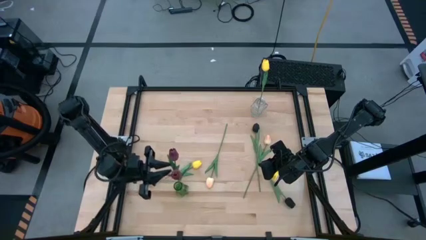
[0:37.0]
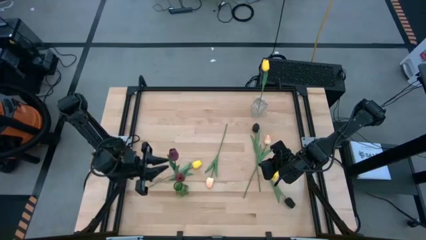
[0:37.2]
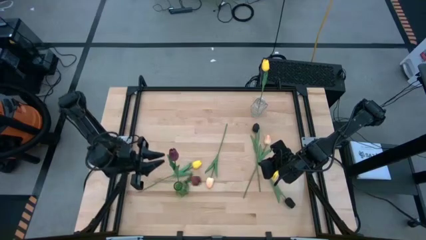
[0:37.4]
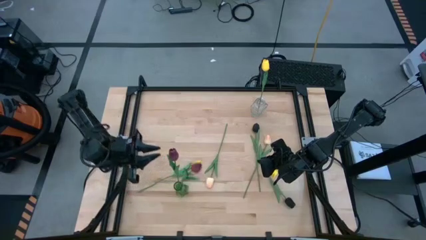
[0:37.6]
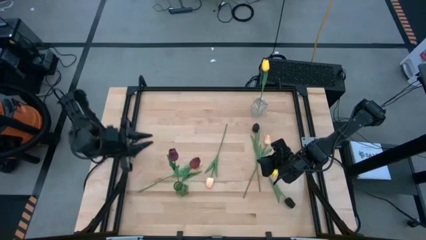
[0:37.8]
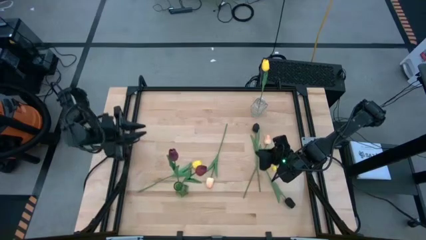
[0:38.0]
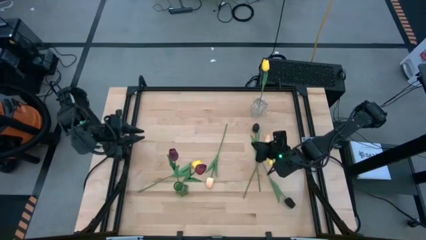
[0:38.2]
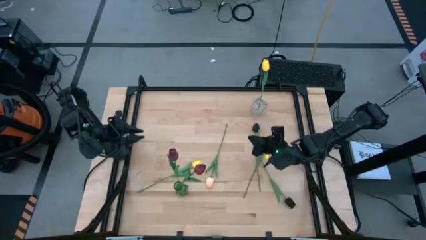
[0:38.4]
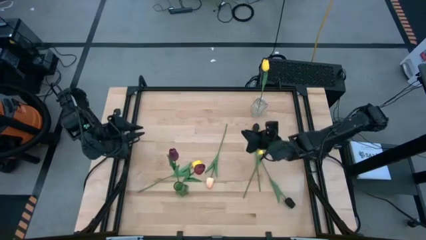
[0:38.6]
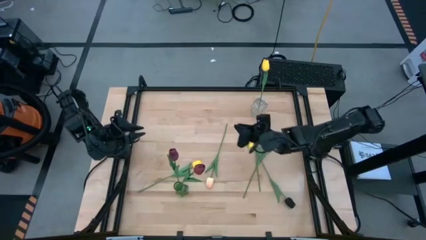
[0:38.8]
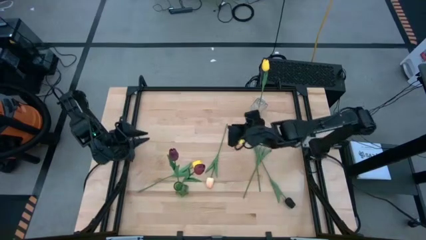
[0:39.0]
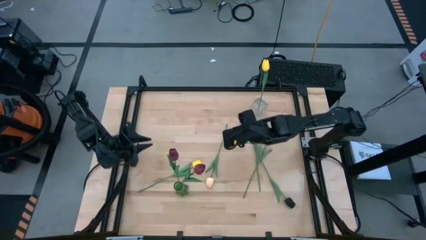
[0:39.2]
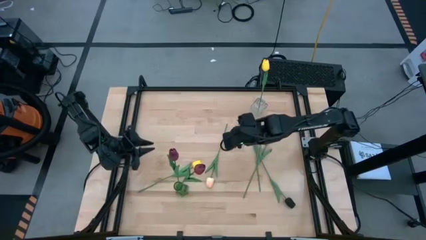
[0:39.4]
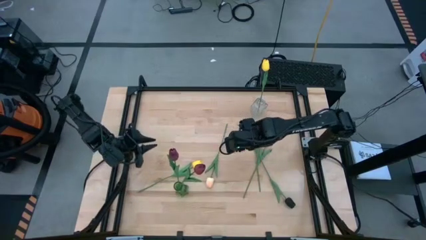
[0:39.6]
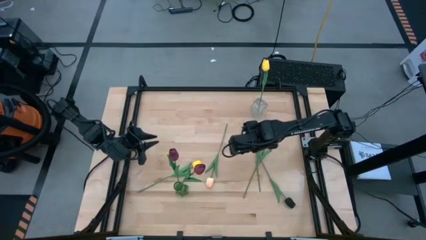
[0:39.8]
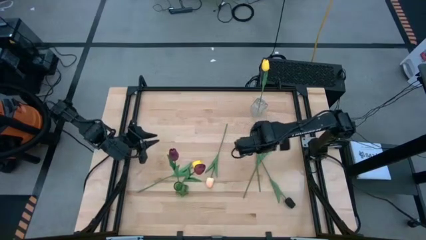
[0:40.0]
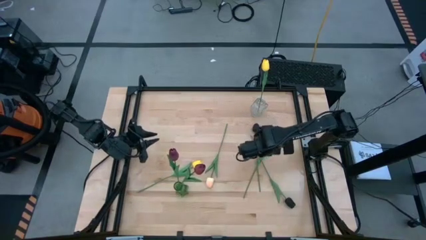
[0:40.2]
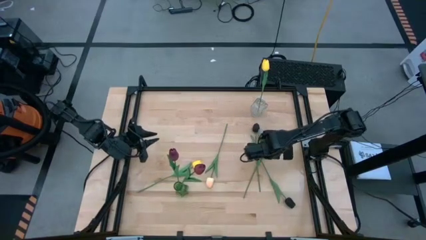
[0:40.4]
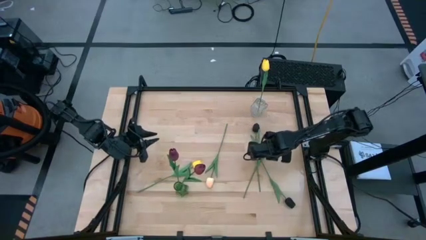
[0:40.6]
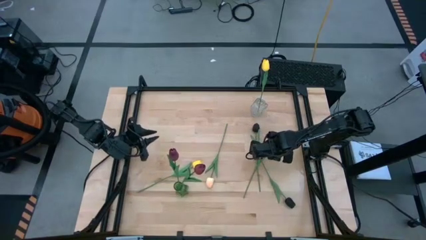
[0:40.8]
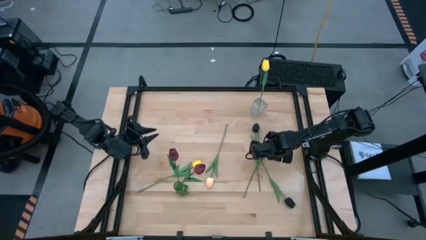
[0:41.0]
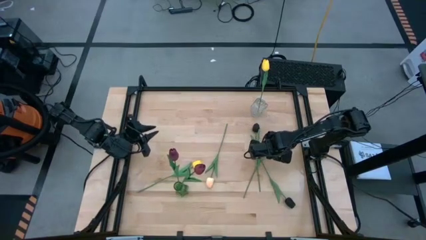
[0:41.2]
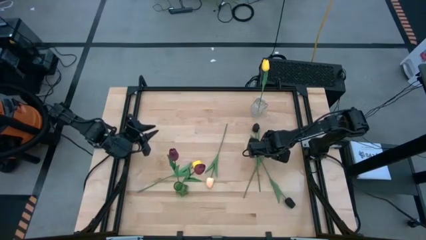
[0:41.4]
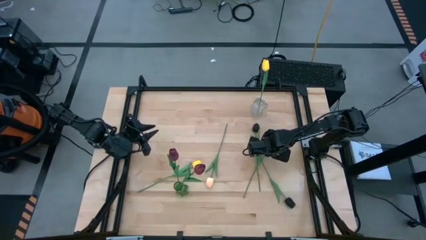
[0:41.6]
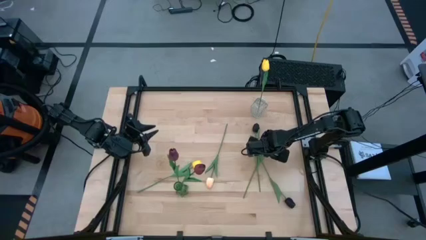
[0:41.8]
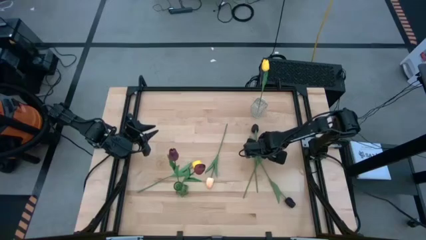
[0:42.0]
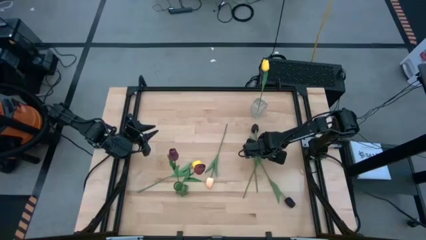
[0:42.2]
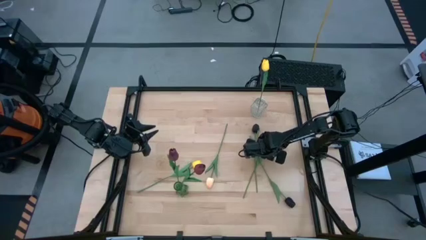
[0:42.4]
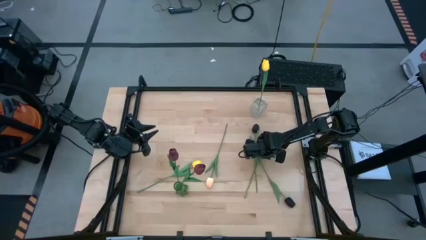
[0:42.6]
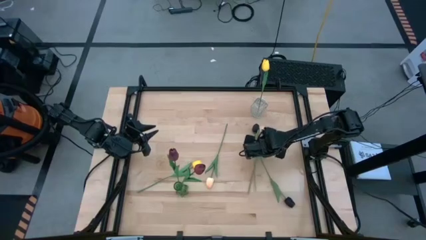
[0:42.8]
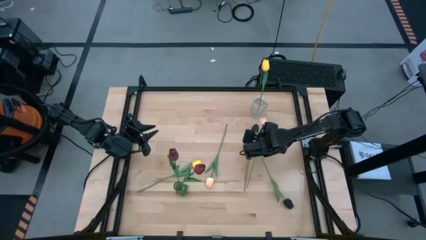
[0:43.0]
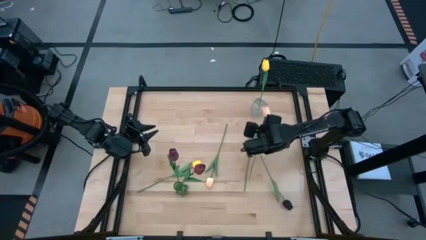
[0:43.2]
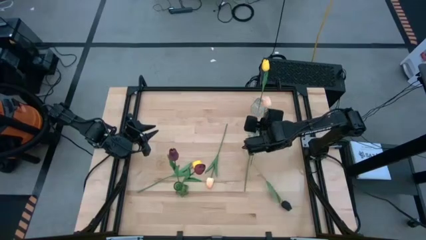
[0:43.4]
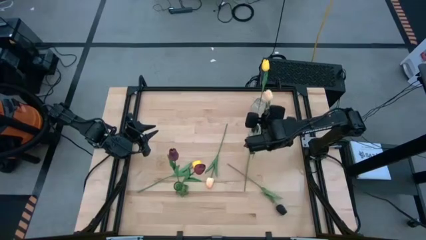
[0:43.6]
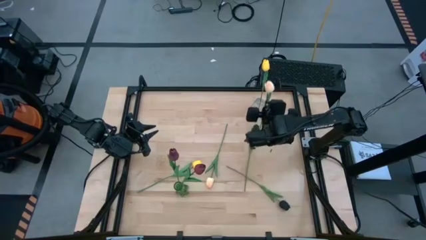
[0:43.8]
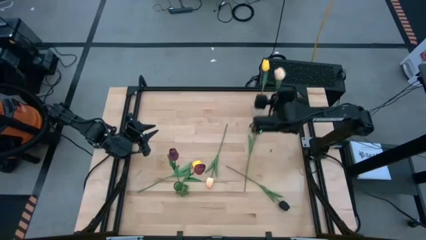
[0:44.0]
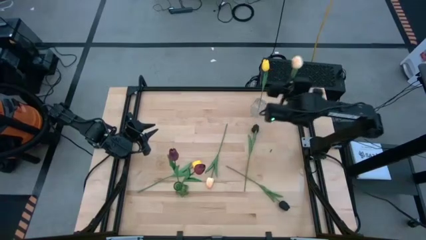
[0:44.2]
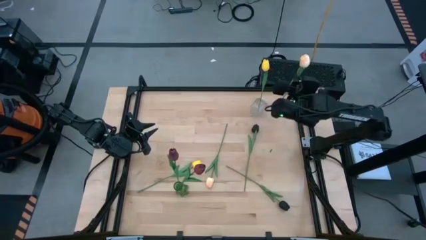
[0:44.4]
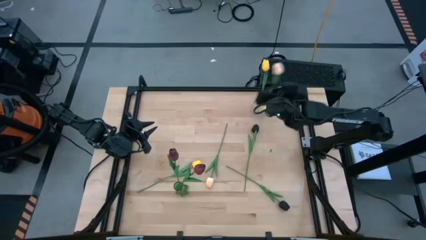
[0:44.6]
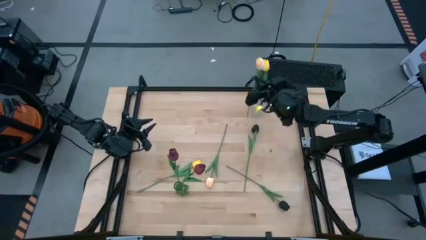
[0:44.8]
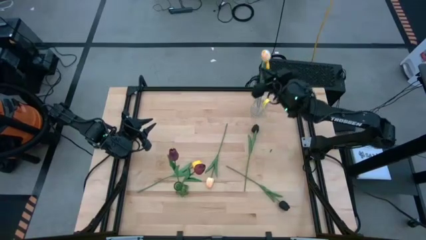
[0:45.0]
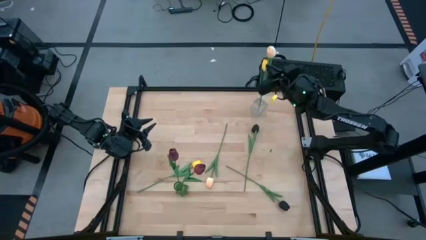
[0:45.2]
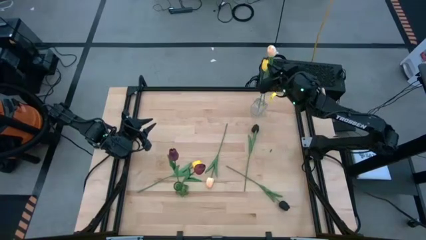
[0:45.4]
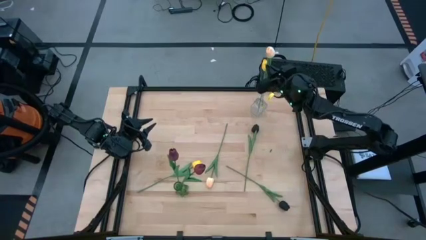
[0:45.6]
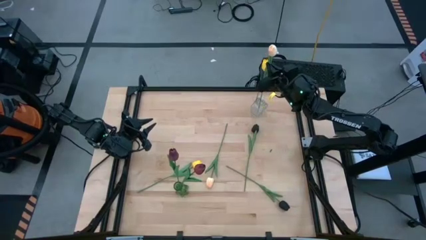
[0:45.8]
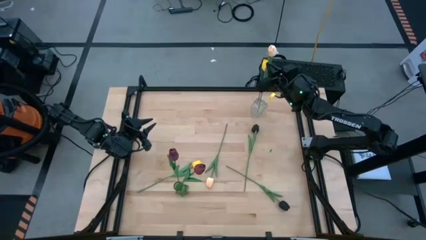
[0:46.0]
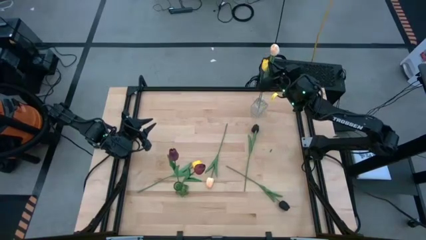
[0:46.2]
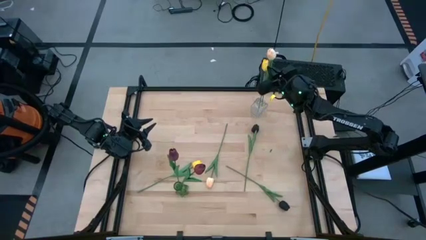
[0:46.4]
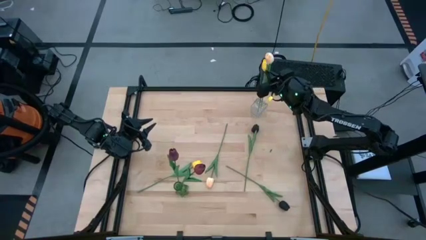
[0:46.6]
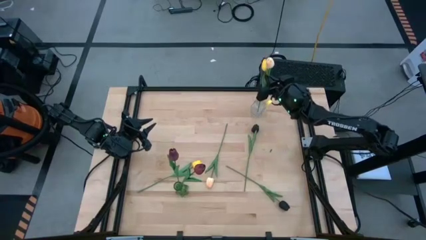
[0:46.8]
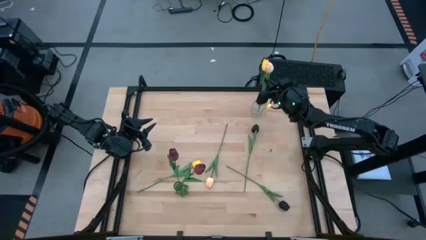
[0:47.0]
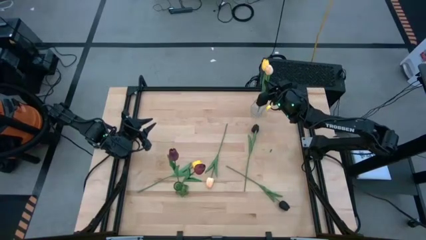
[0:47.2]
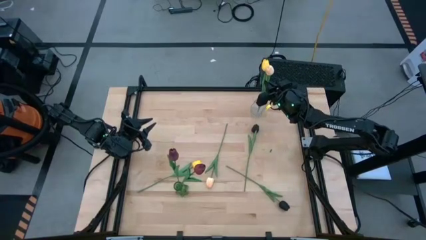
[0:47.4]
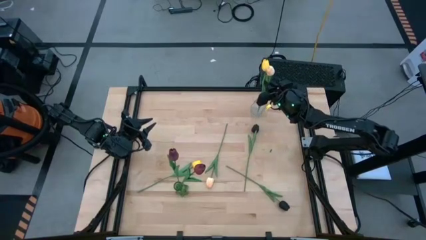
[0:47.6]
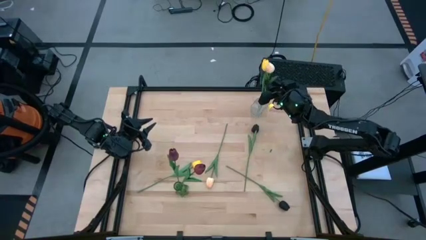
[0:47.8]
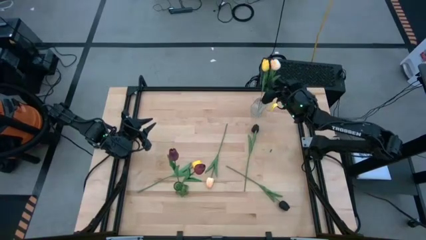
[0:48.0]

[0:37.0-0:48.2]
Task: Sort flowers into vase by color
Put the right light orange flower into the vase
